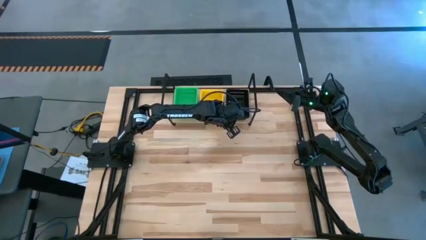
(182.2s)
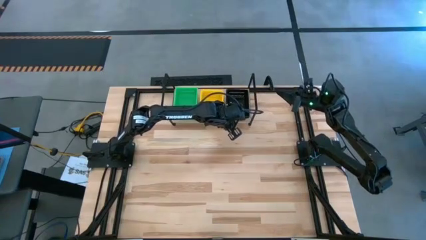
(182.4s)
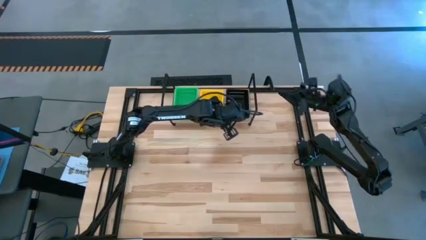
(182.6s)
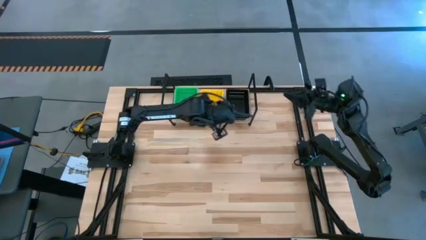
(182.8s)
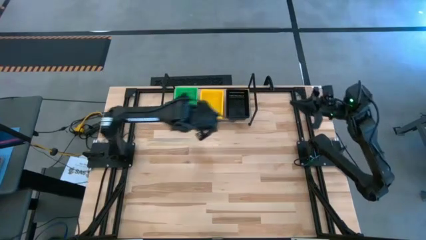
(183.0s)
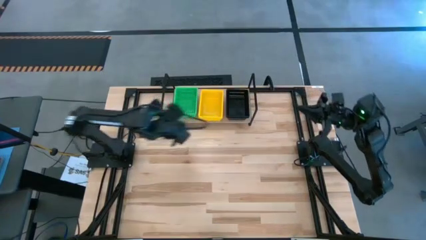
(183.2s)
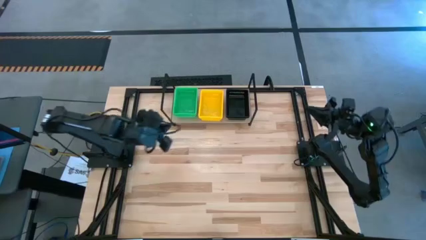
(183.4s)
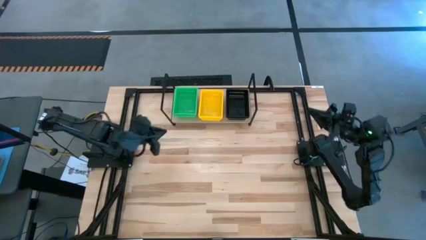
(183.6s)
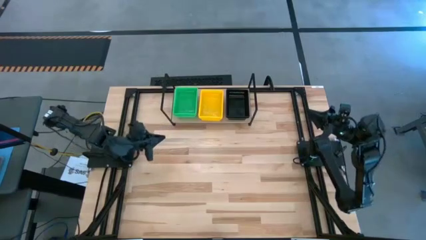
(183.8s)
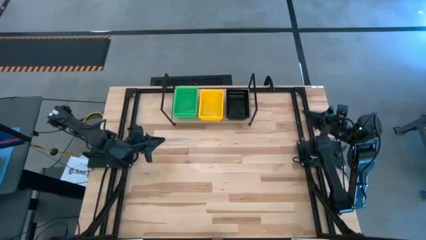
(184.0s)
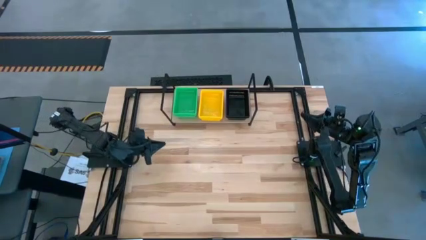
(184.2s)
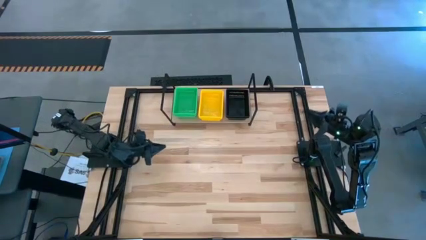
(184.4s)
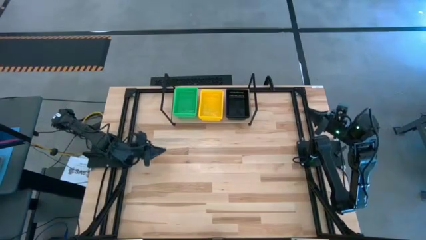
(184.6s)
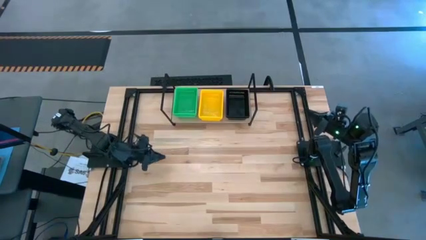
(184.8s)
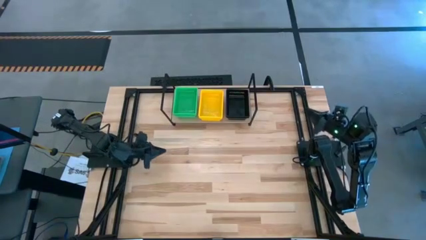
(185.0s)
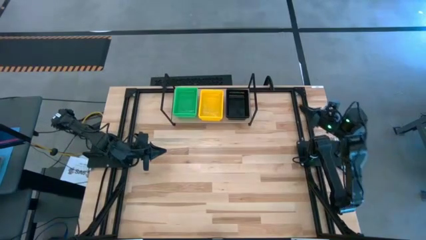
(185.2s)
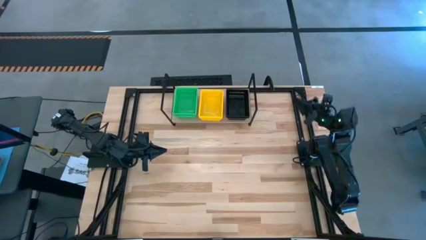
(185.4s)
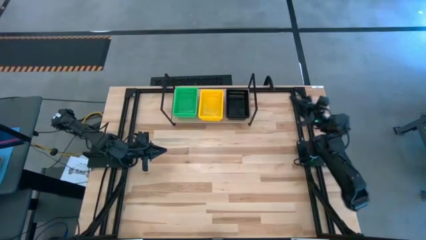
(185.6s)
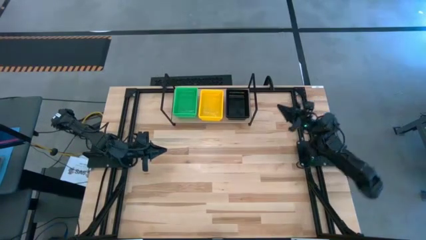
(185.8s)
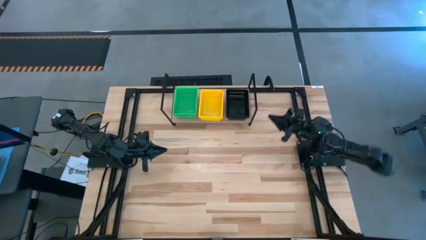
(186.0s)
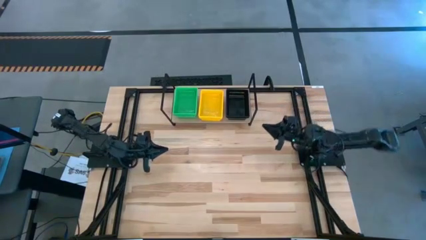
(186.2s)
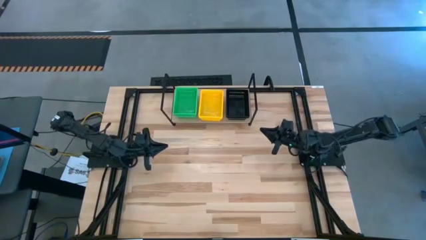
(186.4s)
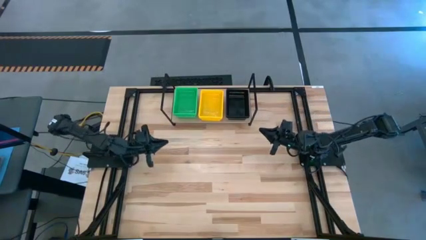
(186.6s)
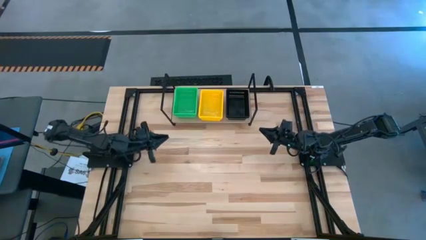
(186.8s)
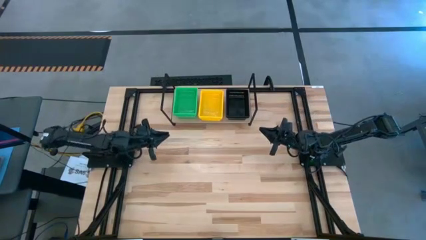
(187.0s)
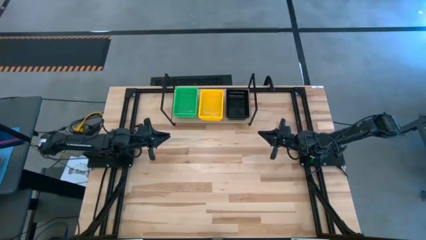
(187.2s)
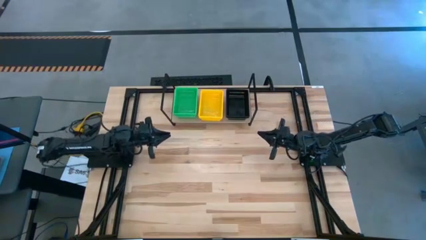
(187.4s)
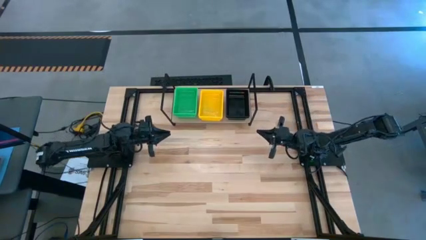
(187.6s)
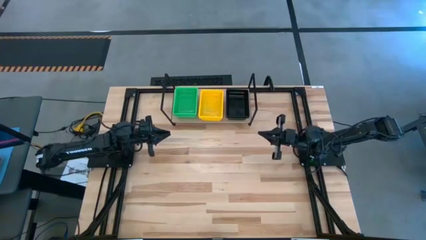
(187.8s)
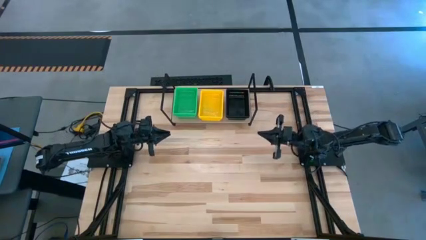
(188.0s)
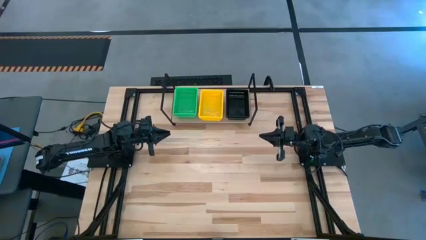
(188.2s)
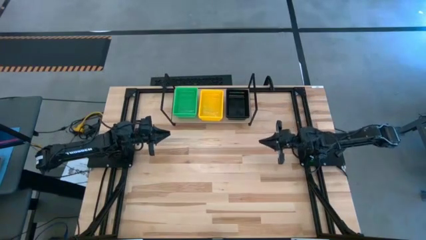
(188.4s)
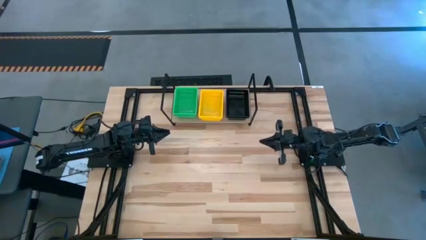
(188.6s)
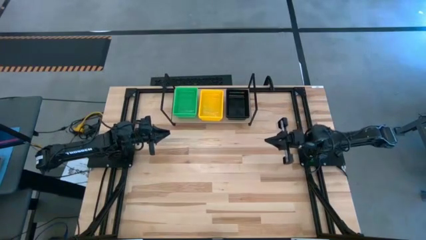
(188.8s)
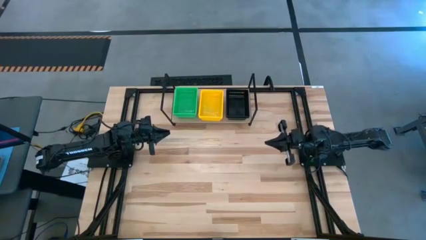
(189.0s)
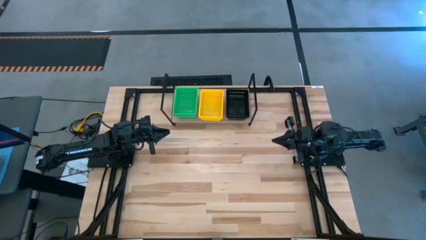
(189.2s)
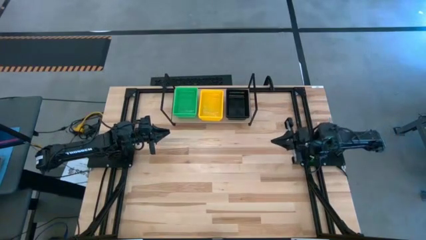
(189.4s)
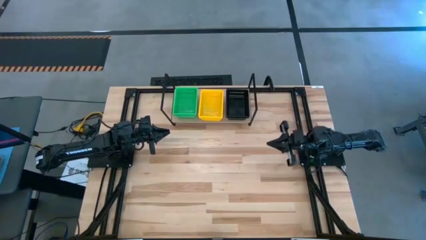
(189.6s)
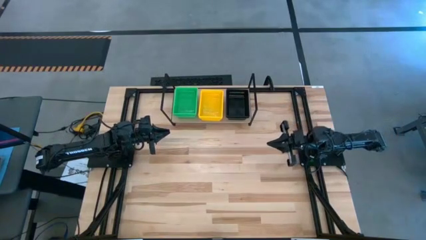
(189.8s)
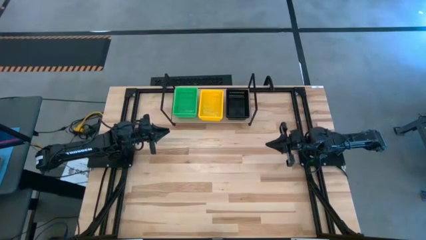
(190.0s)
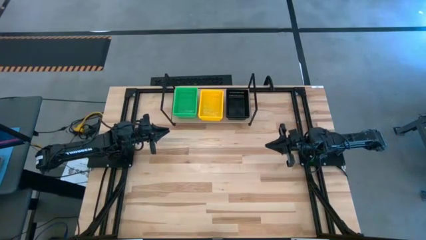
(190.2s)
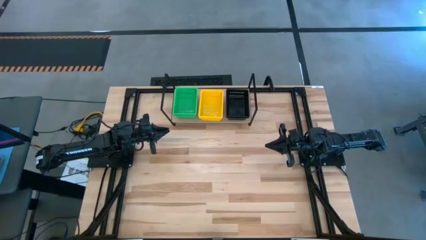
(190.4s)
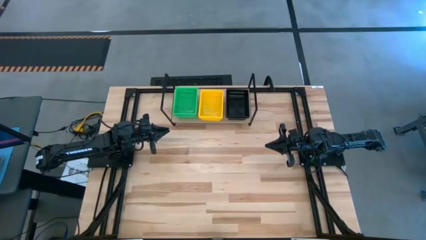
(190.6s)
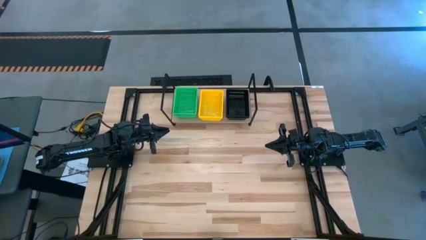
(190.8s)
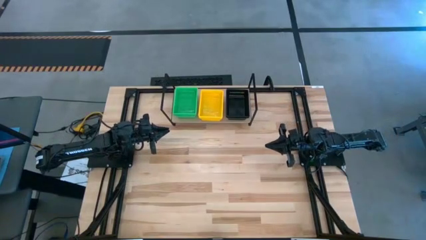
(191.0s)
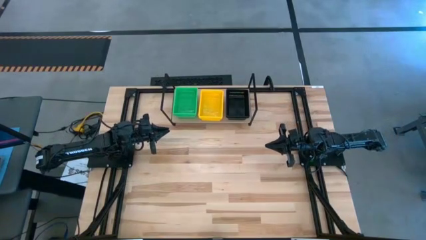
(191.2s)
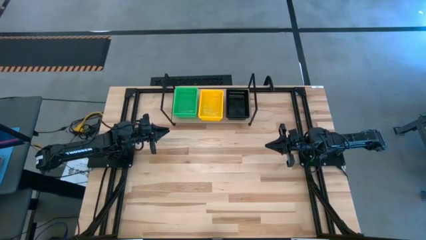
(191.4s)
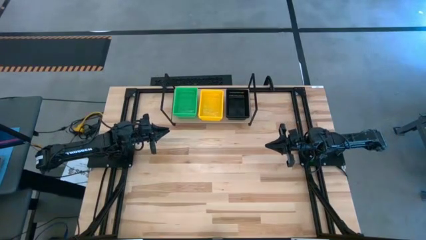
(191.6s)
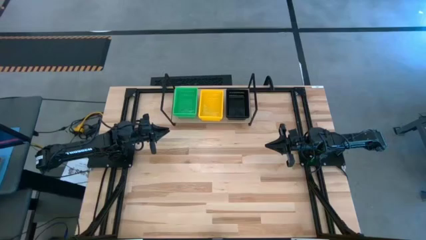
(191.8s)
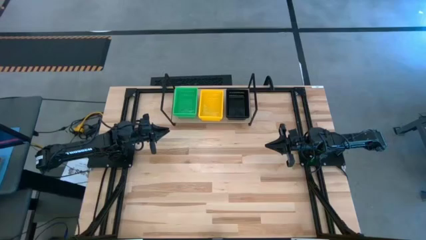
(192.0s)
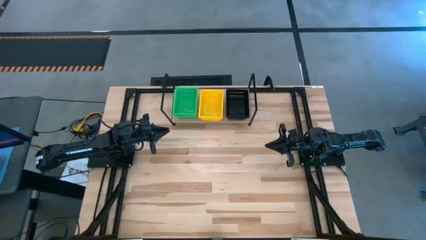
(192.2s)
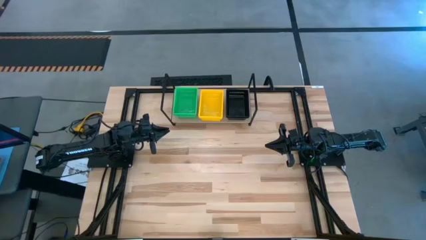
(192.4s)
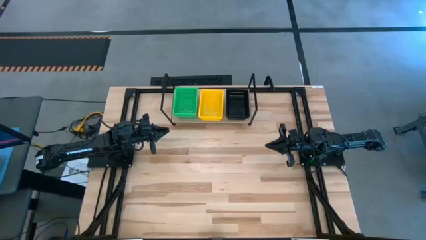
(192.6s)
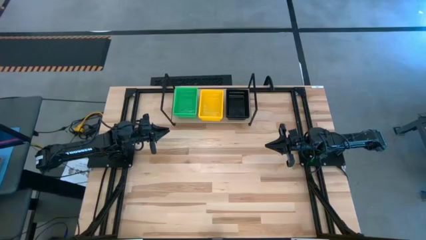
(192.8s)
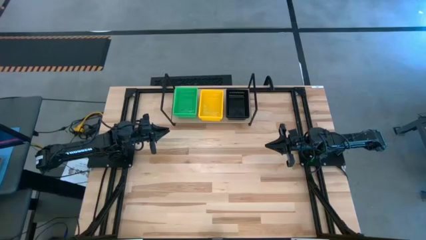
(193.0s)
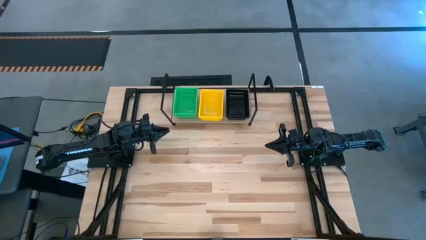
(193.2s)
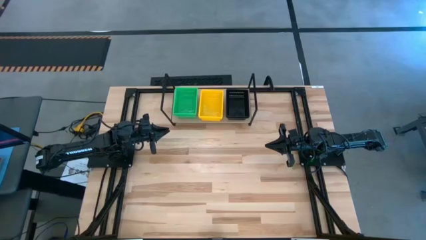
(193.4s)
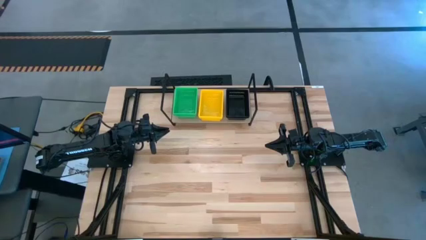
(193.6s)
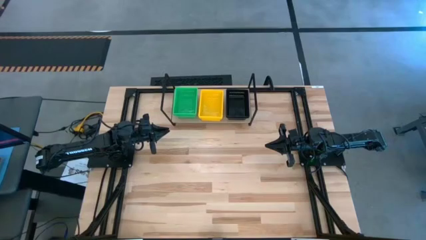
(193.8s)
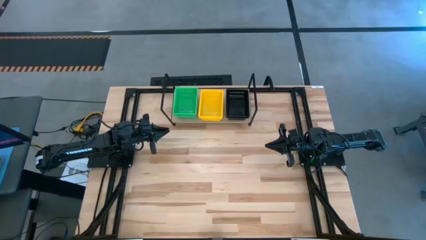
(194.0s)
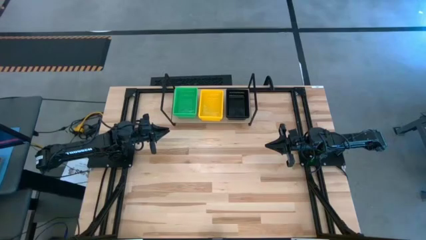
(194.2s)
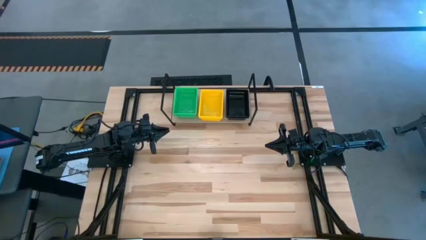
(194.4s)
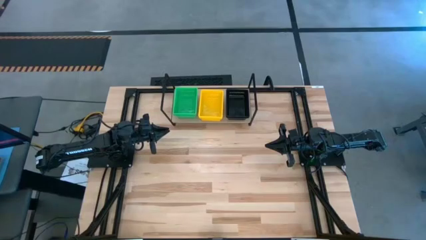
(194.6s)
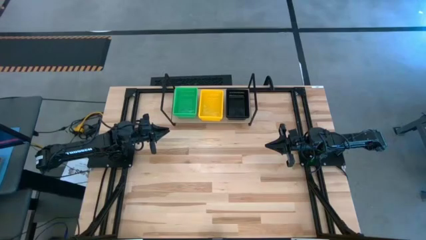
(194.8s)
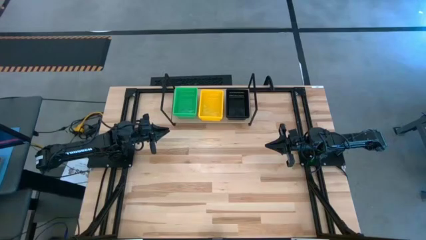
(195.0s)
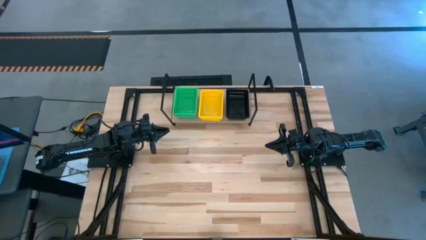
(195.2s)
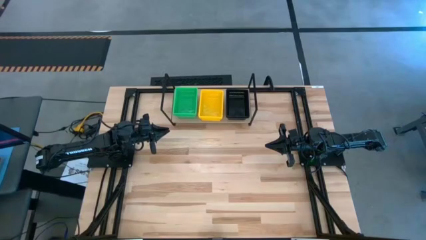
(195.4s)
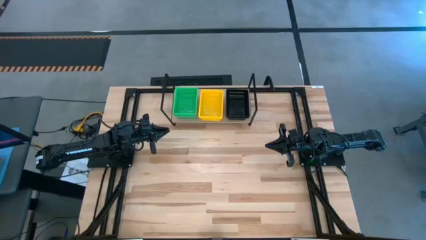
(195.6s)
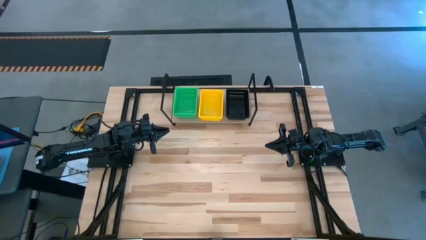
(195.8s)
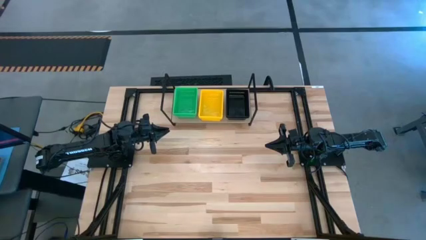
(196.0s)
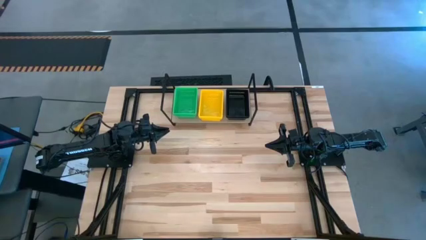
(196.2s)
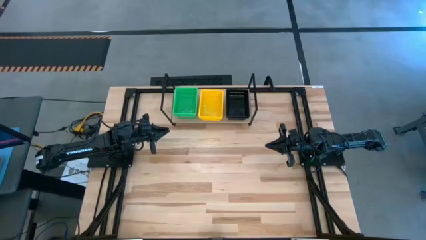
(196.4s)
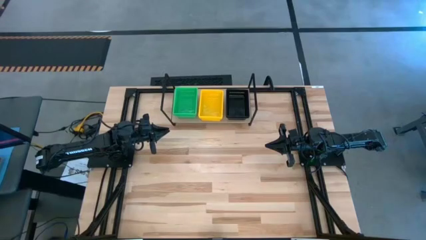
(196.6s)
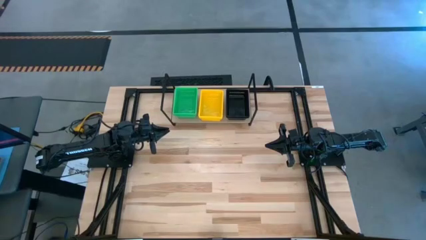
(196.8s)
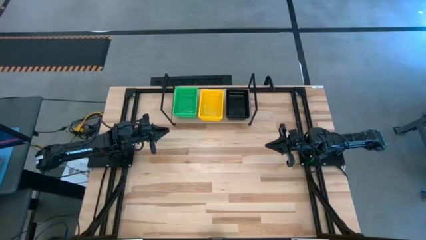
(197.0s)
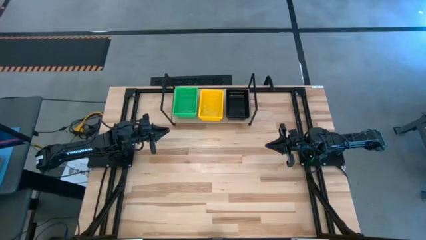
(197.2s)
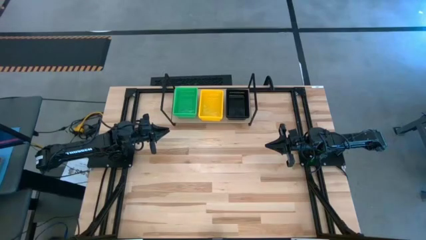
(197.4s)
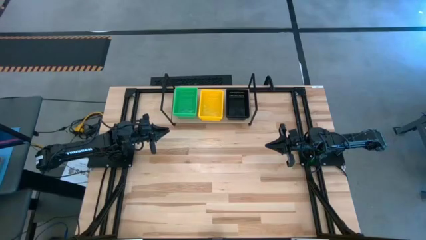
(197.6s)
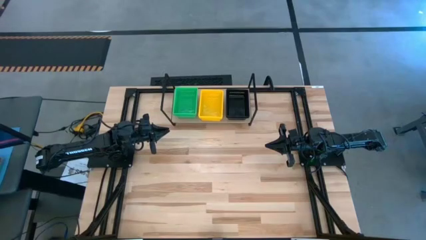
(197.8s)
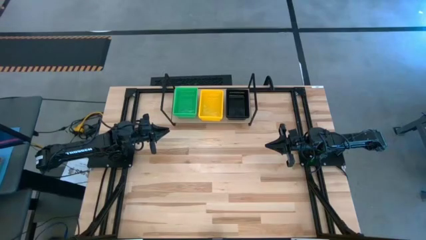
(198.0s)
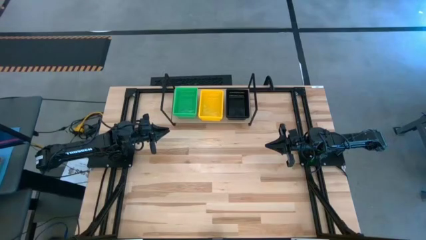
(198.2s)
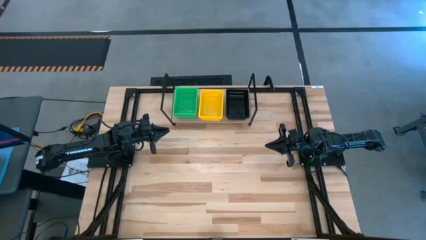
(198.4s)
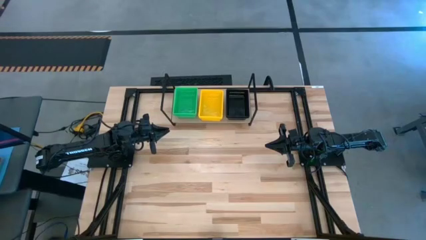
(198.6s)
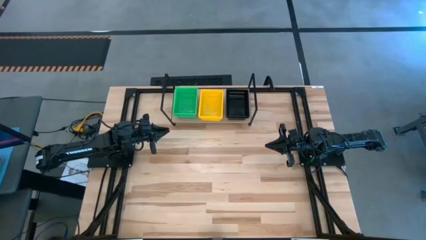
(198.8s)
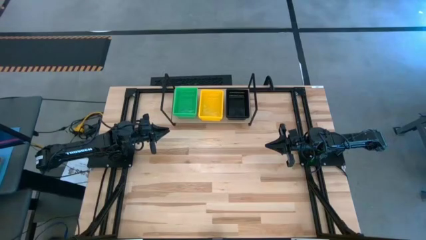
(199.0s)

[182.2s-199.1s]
Task: Stack baskets on shelf by color
Return to Home Position
